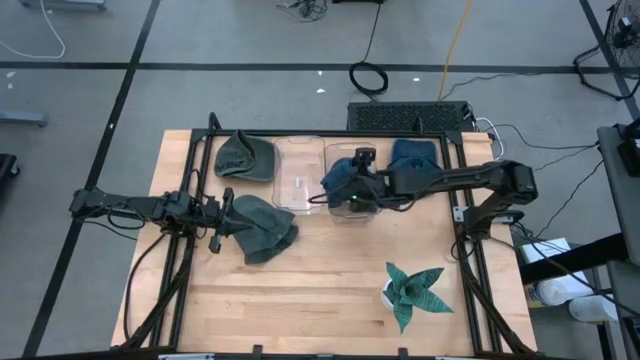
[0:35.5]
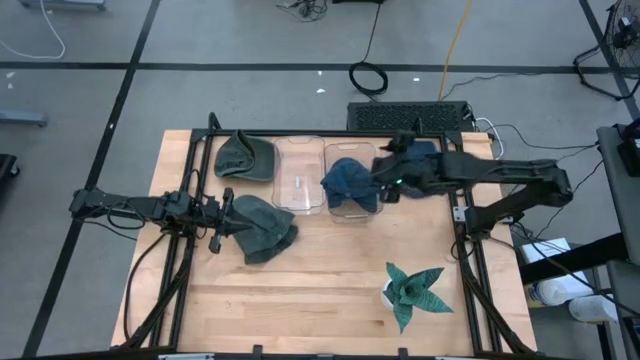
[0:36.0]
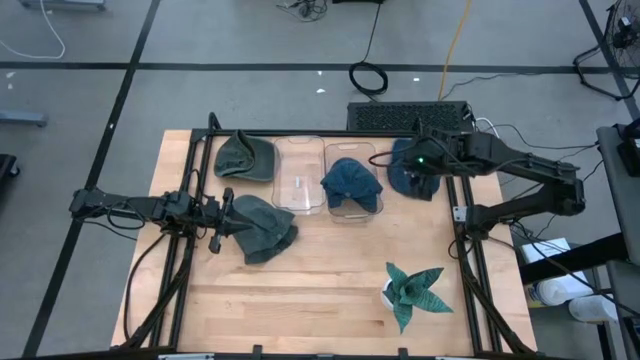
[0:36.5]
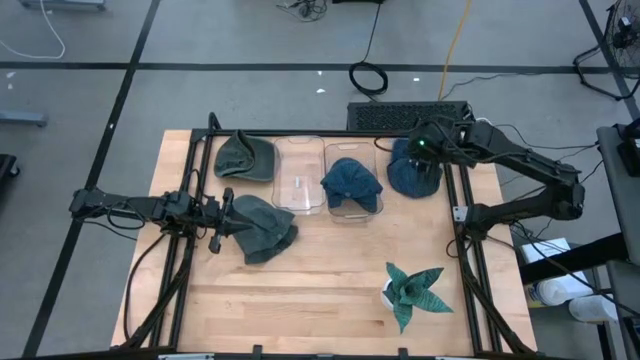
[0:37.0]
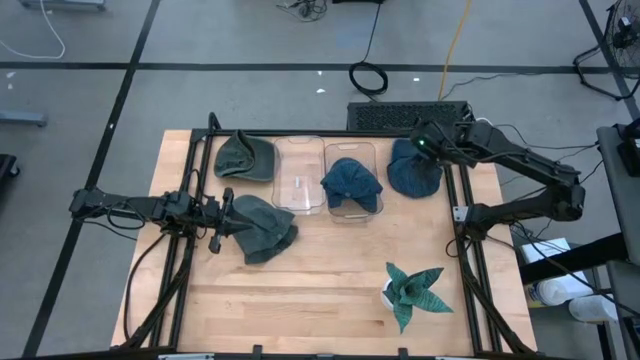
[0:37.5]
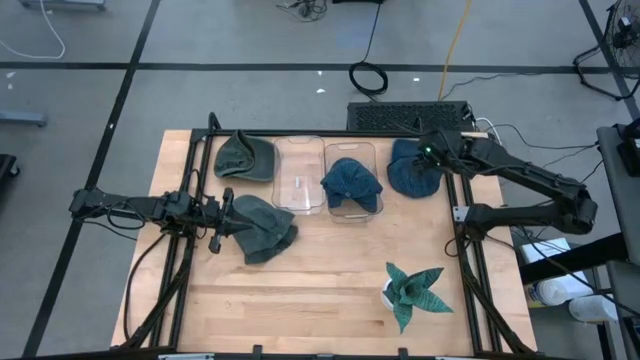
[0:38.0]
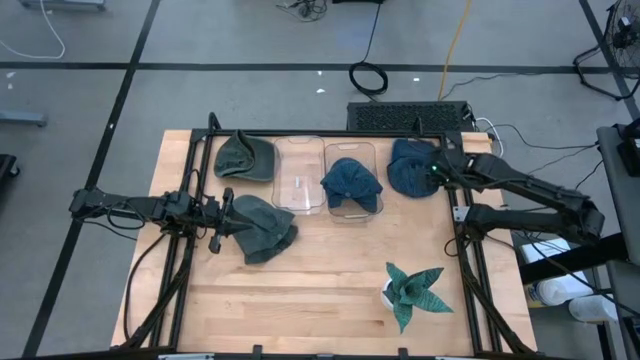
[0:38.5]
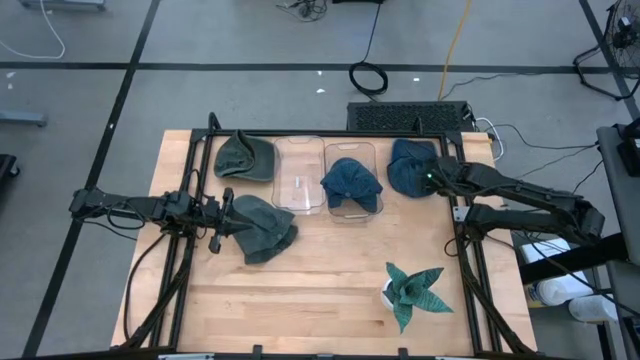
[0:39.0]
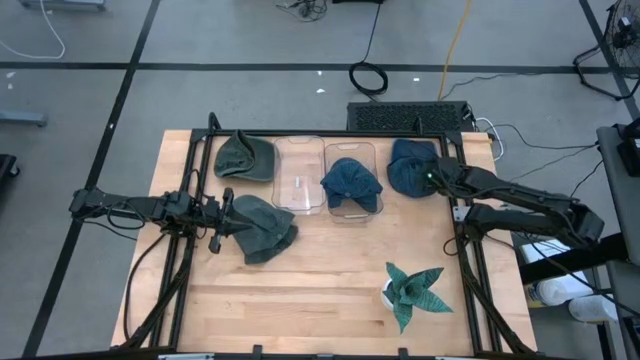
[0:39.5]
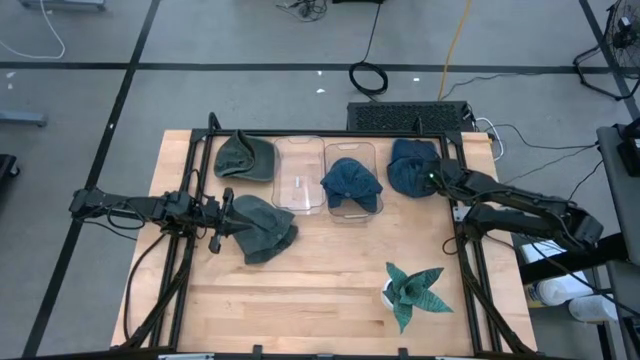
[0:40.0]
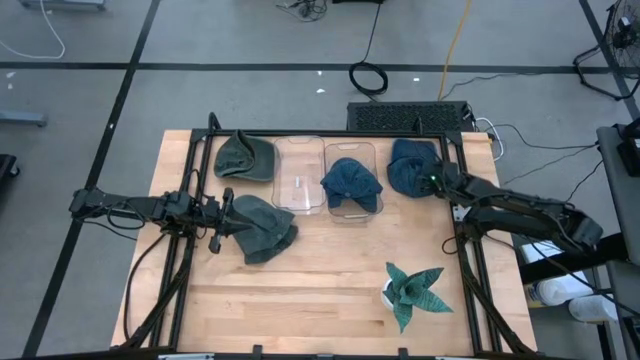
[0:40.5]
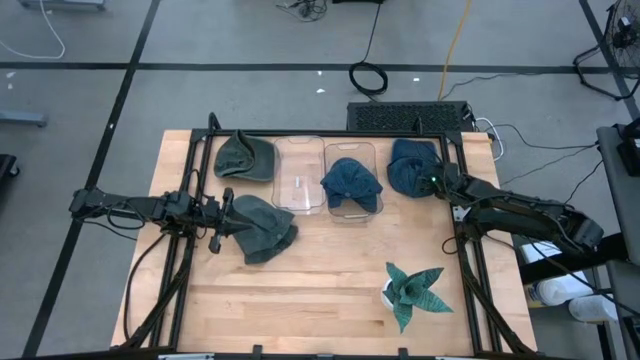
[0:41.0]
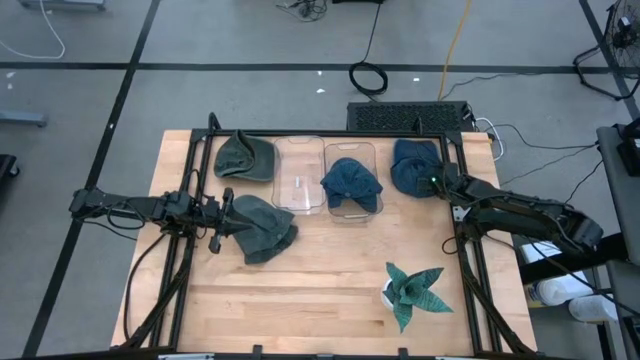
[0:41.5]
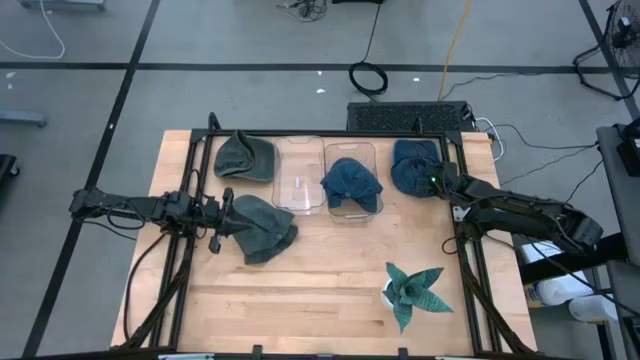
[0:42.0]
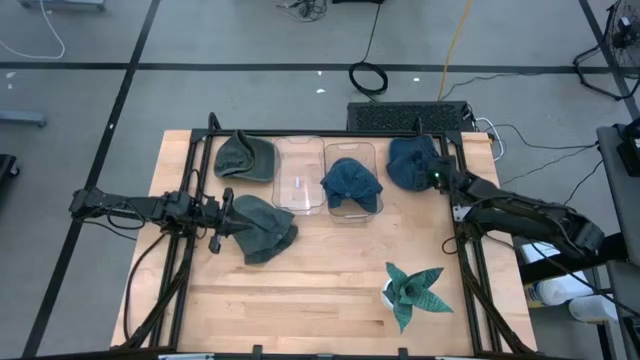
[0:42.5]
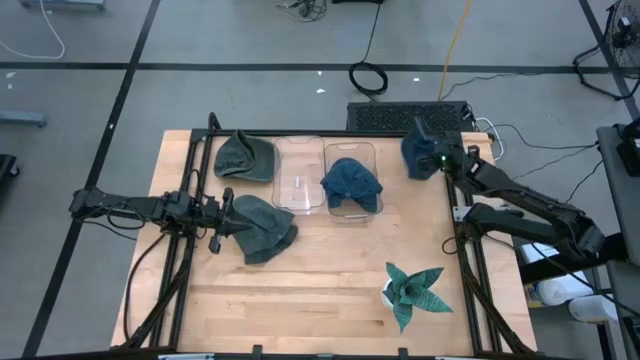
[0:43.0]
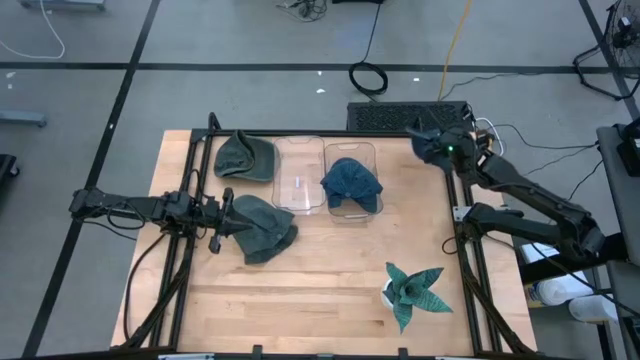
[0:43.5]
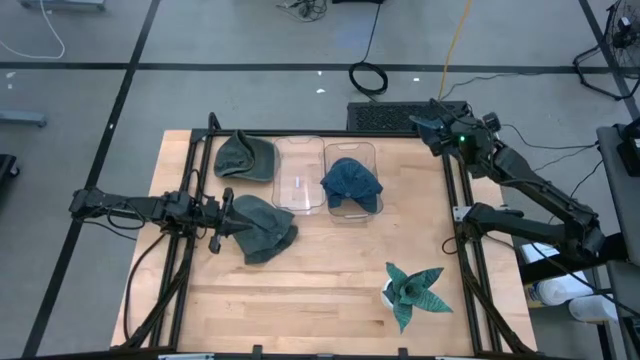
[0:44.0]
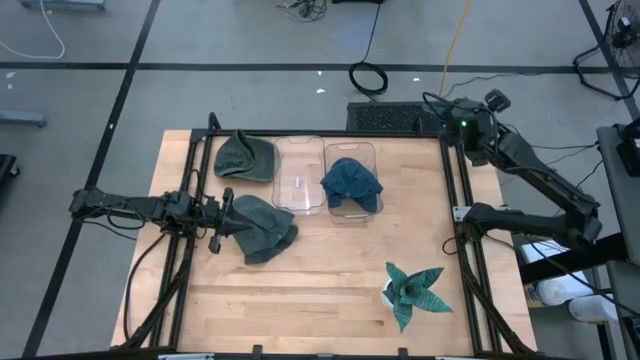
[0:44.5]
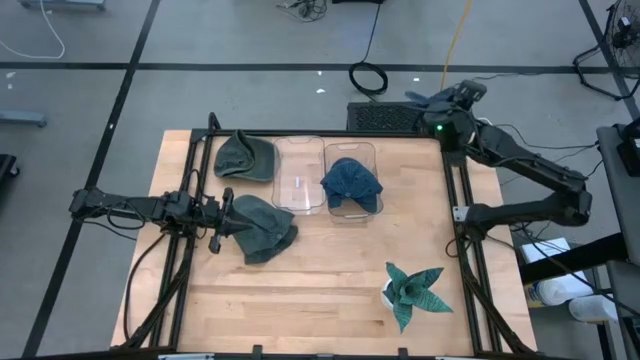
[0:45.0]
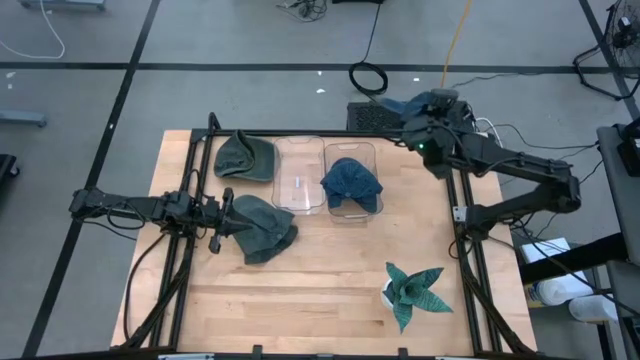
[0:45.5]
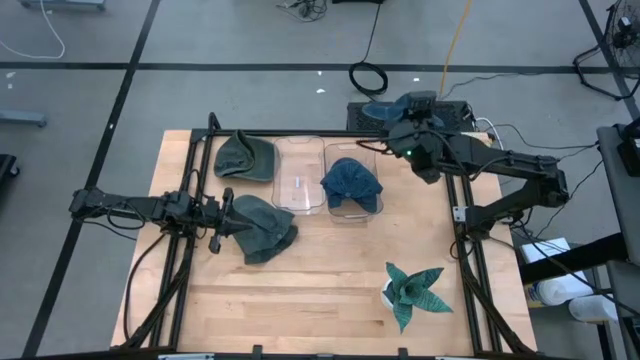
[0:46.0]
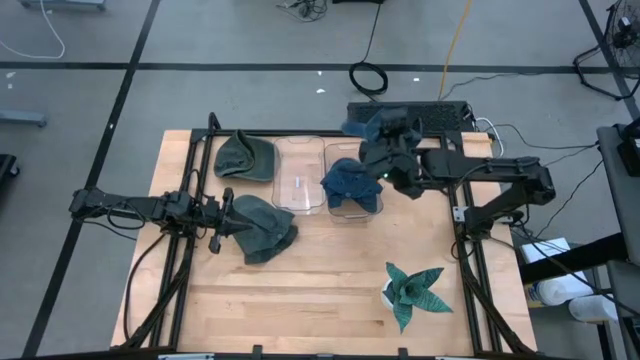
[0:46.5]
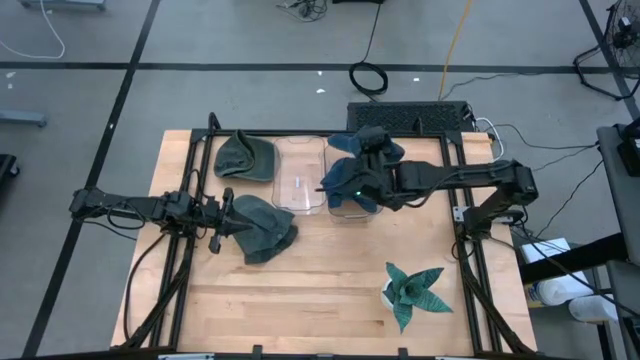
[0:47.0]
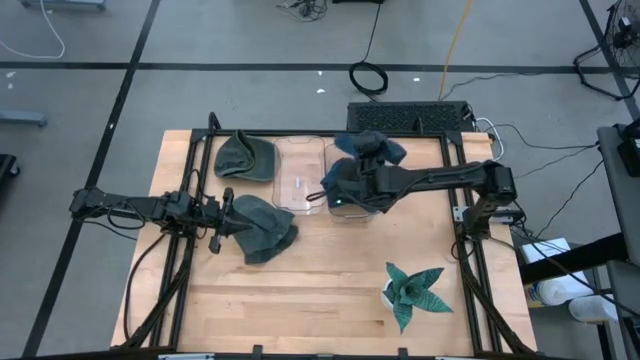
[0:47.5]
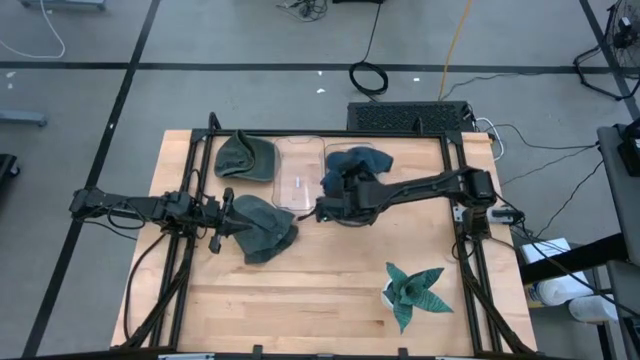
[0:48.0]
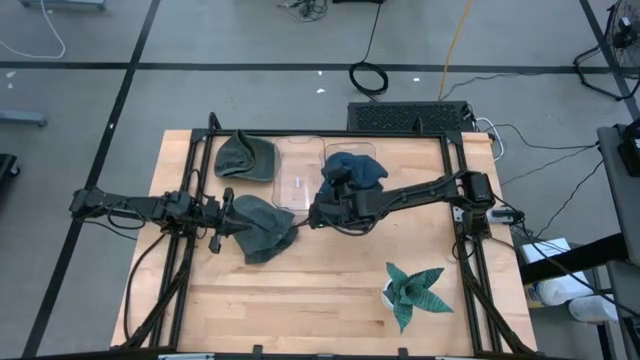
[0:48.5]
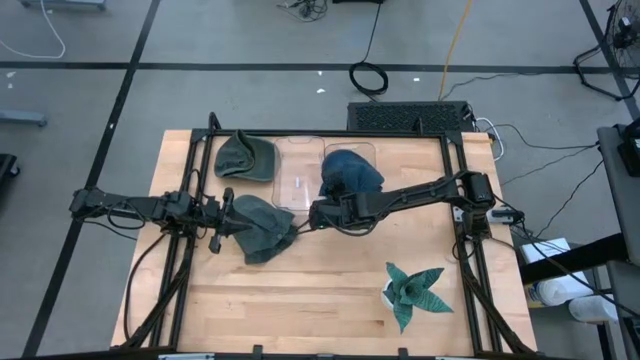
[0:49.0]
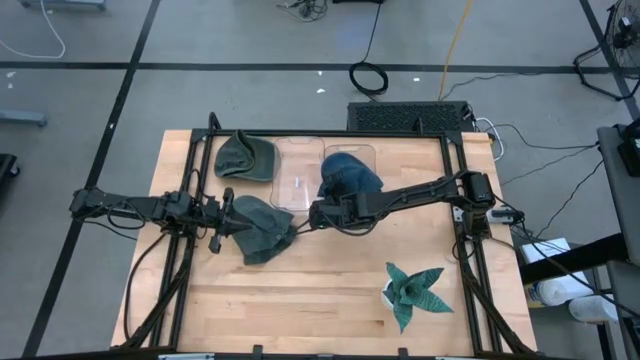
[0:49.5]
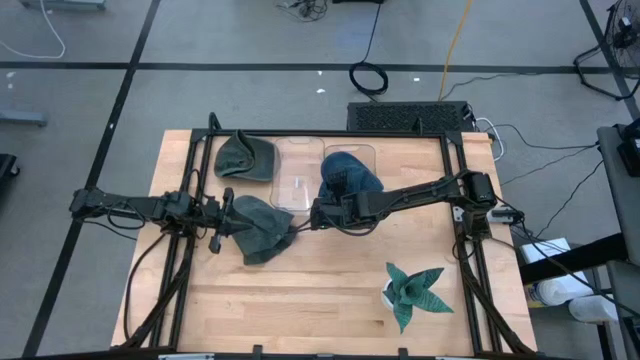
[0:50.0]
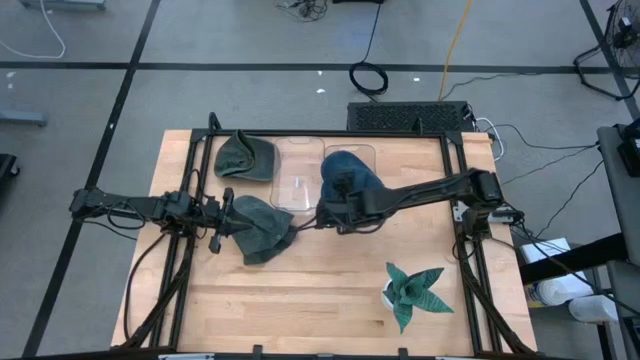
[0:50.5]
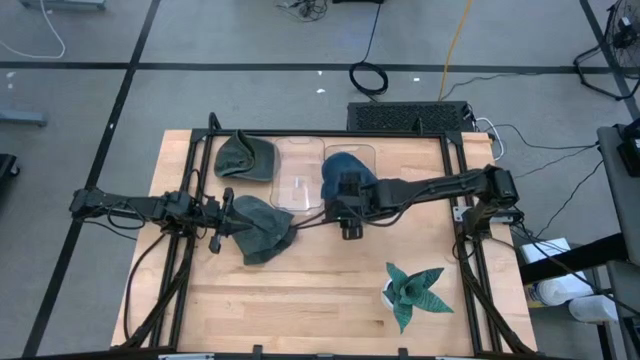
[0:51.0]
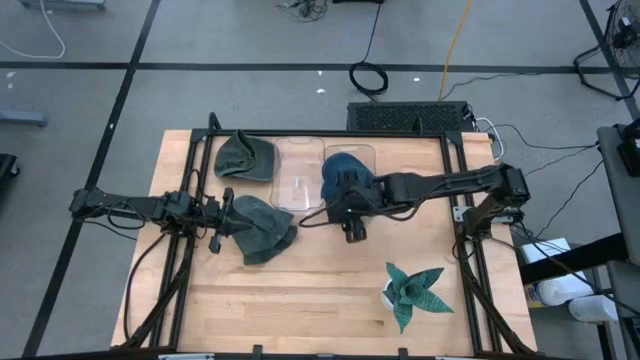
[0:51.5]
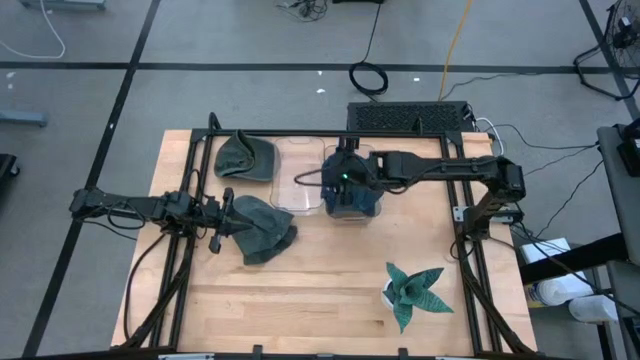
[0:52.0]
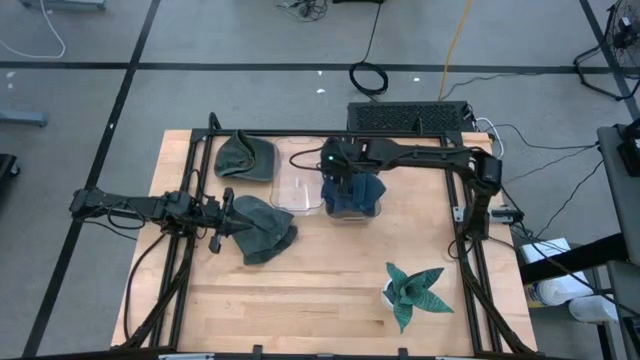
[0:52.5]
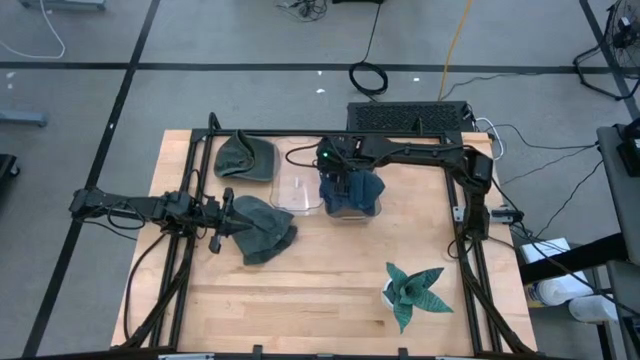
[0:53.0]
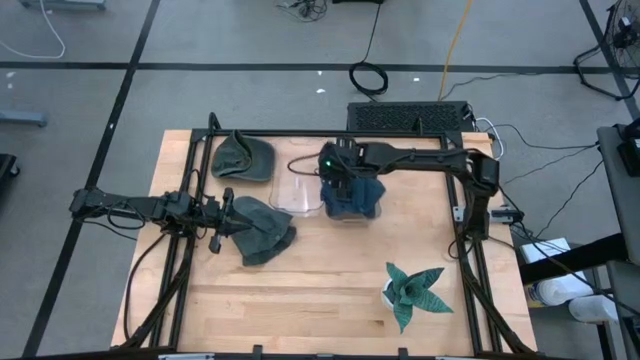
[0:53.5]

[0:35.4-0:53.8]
Task: Pick & Place hat
Put the blue cap into the right transparent bin
